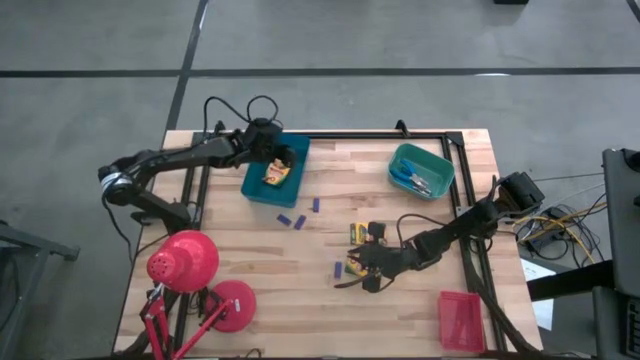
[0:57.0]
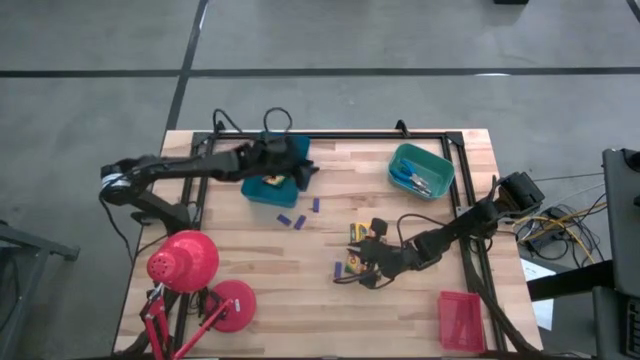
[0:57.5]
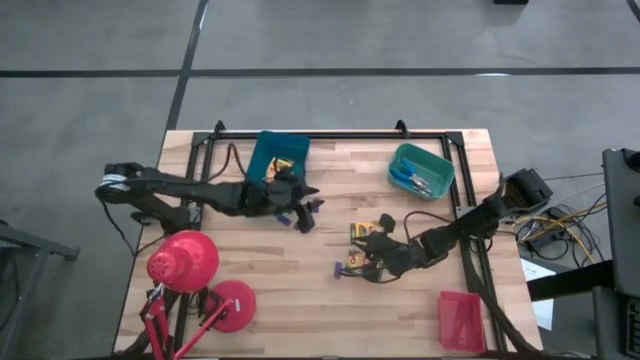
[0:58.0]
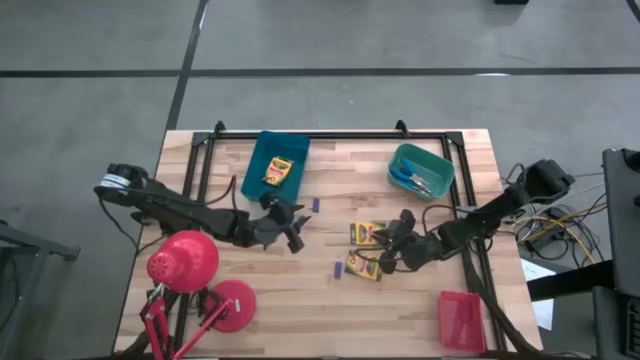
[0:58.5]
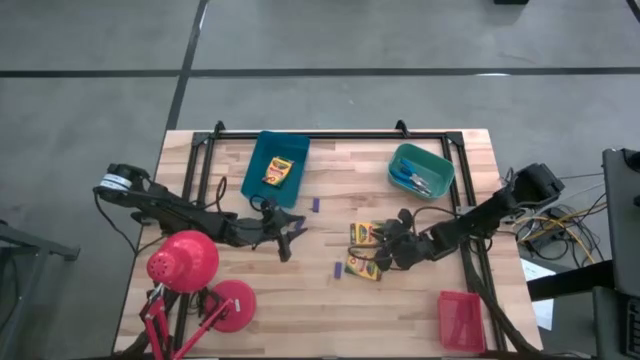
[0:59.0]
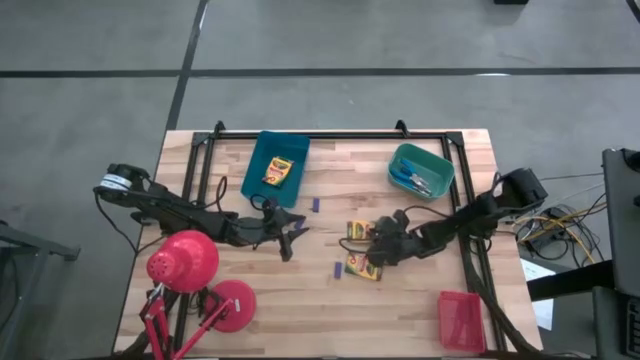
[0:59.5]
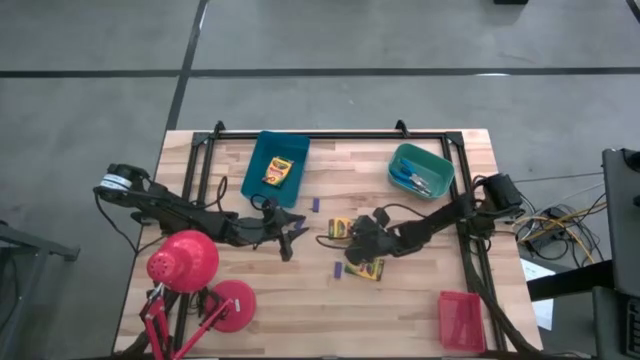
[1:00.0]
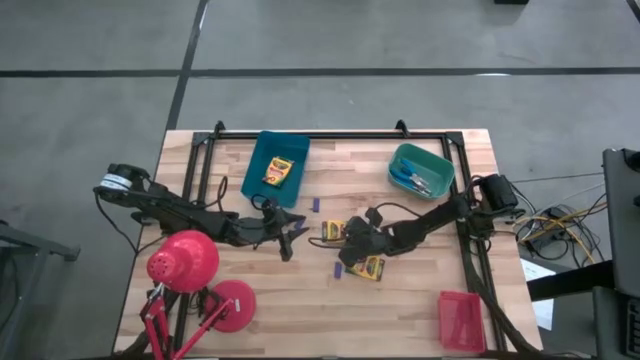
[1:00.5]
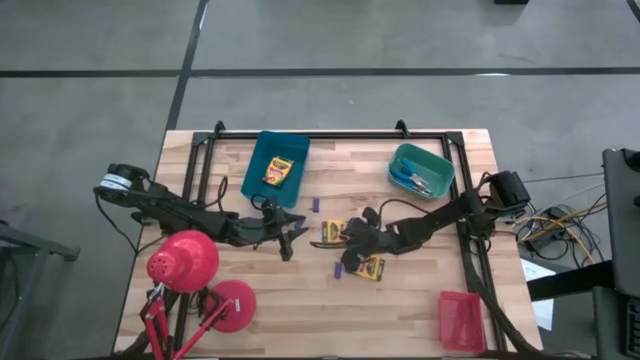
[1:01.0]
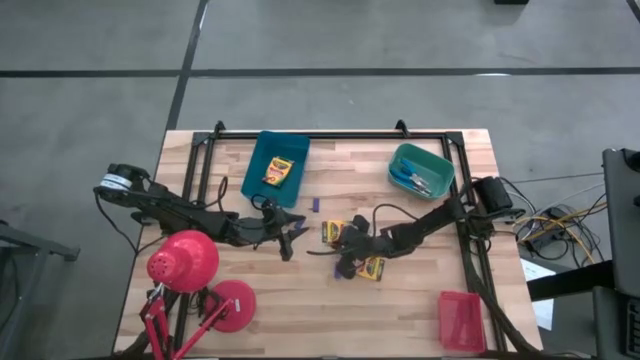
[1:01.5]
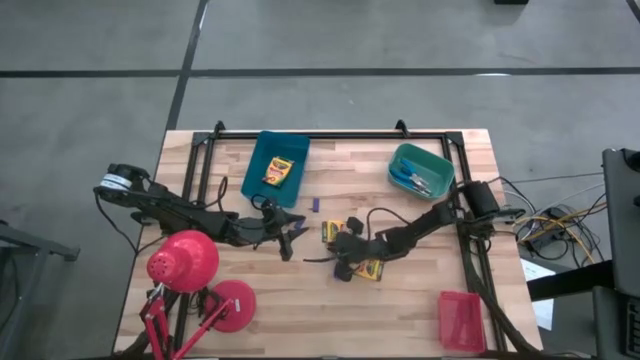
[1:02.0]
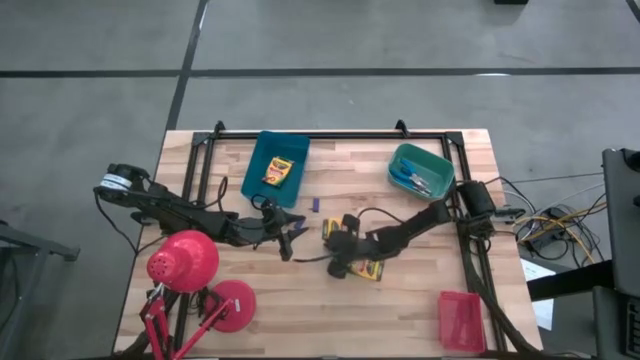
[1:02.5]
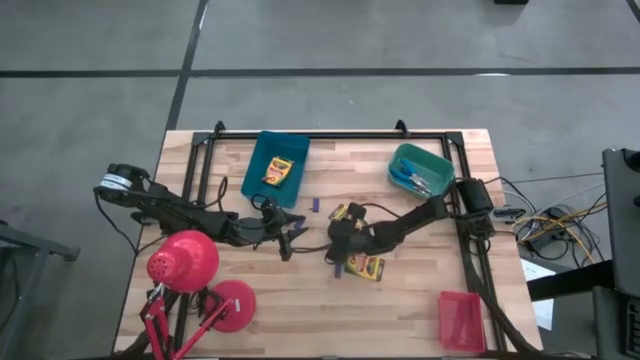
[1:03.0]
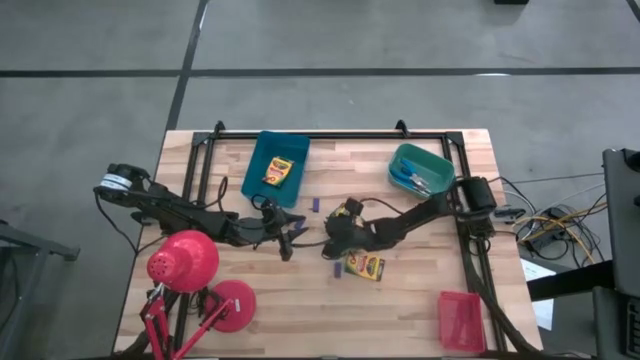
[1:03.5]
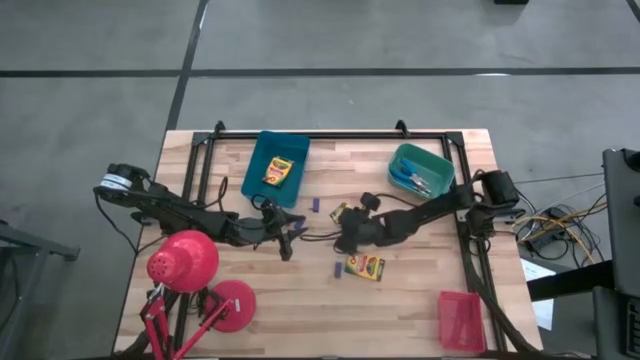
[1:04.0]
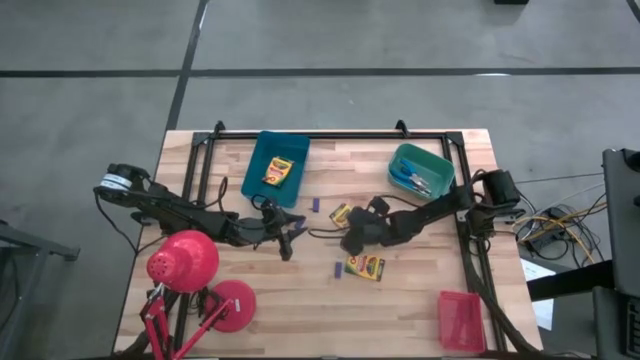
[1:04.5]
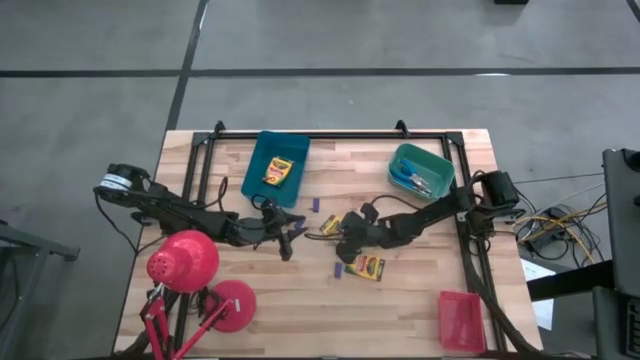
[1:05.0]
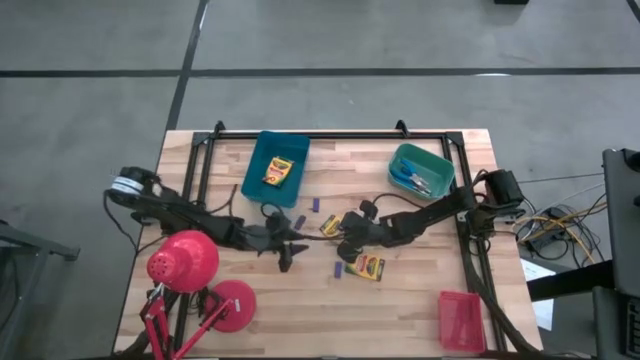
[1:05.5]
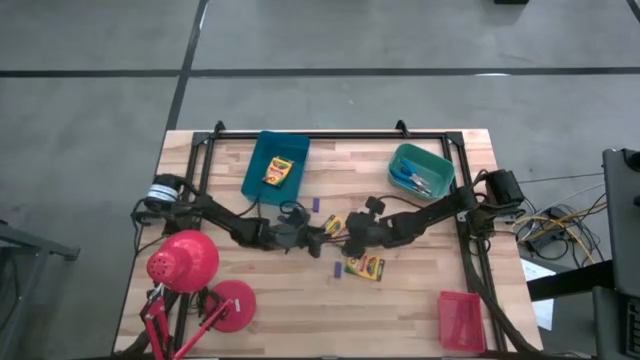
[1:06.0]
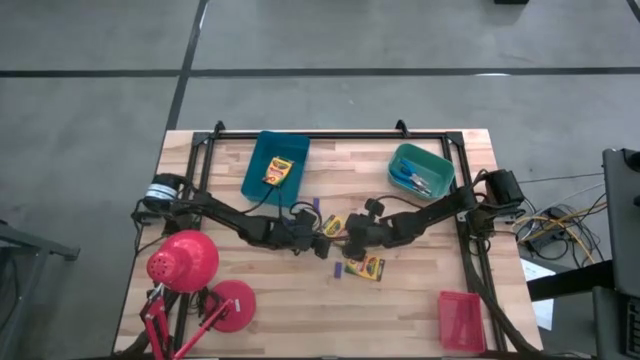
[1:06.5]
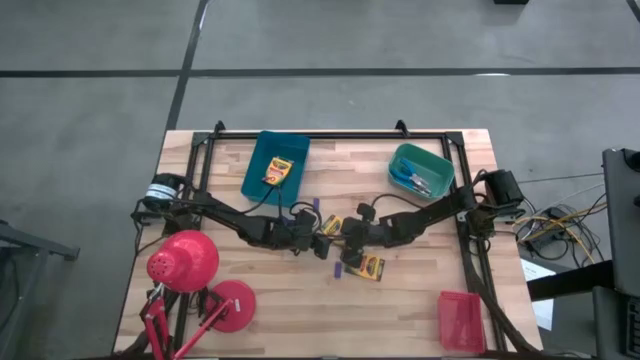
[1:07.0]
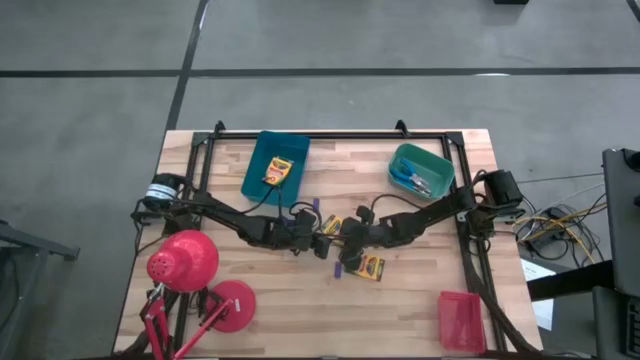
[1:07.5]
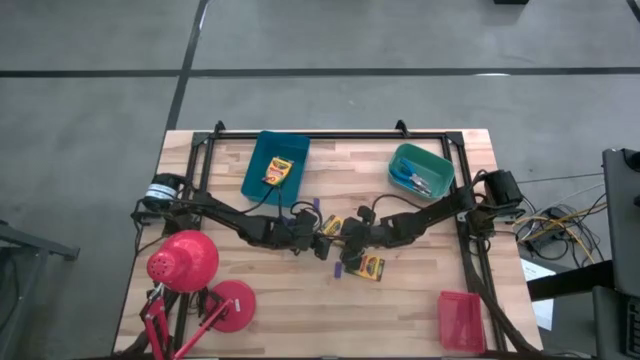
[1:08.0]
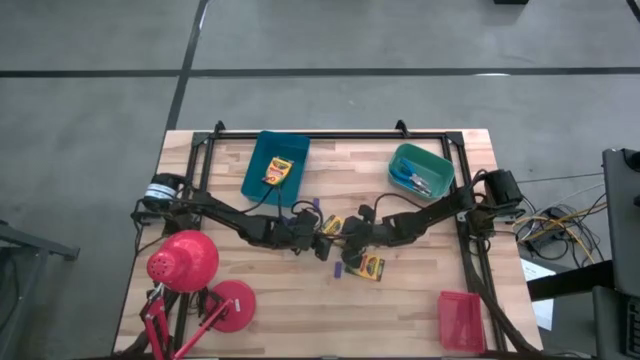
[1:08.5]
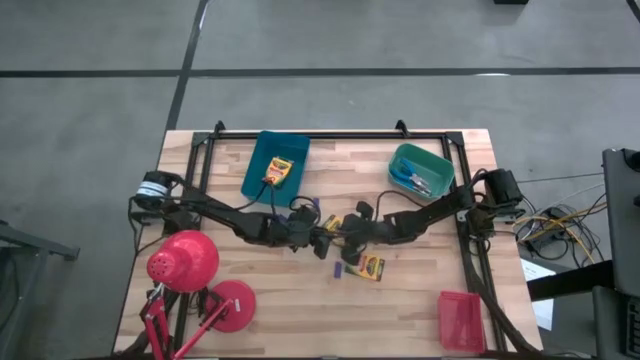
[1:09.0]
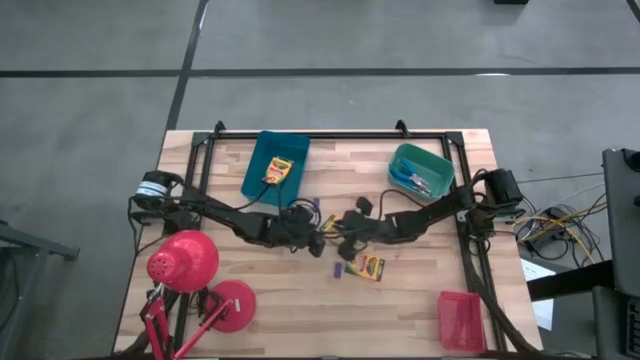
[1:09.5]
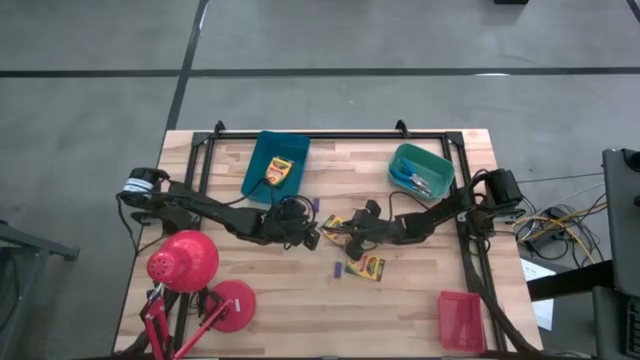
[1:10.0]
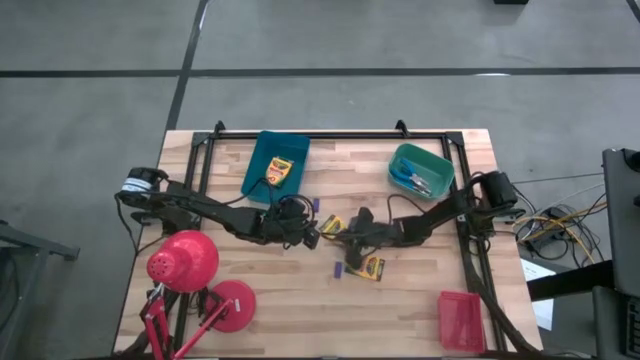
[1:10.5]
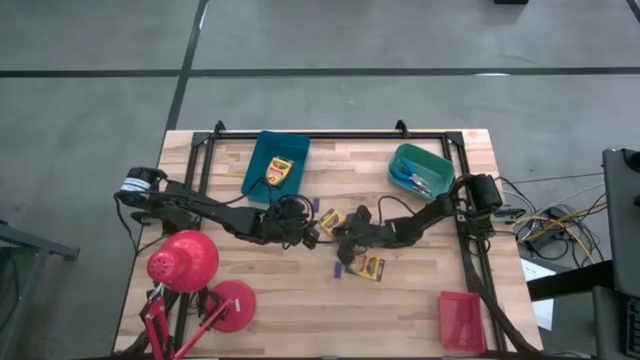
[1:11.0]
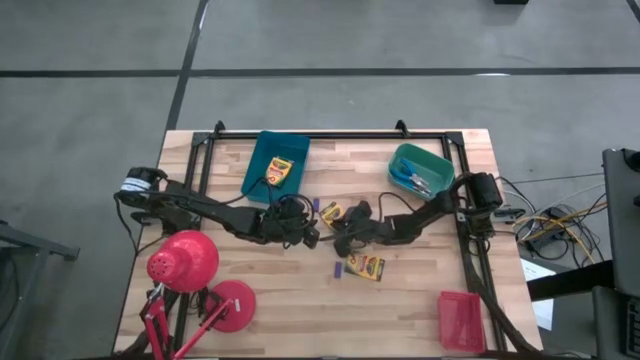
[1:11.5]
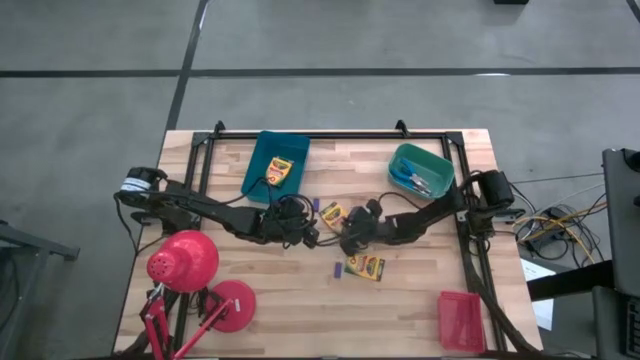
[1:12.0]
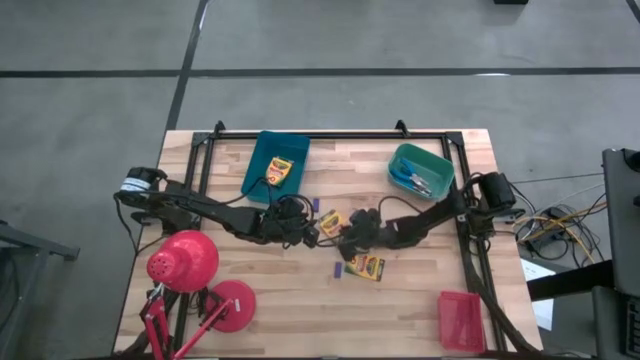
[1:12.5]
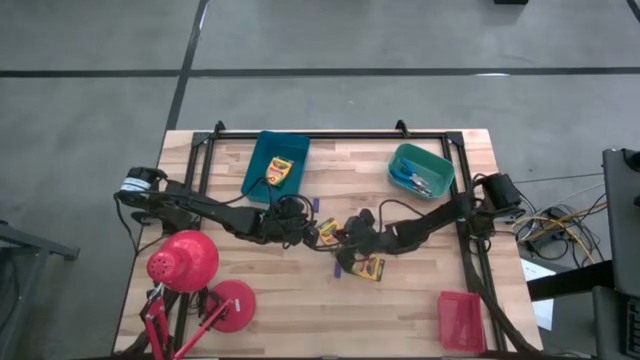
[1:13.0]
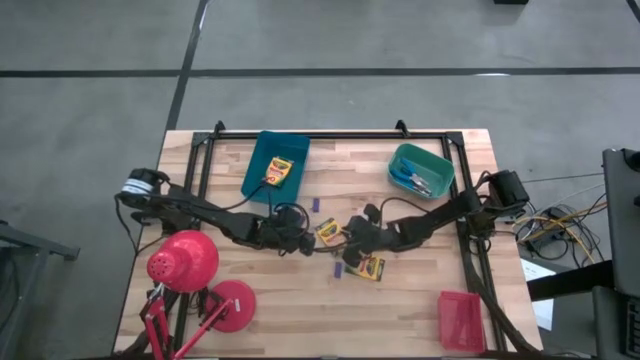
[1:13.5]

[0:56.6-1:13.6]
Task: Pick & Place School Supplies
Put the yellow crayon box into the blue bin

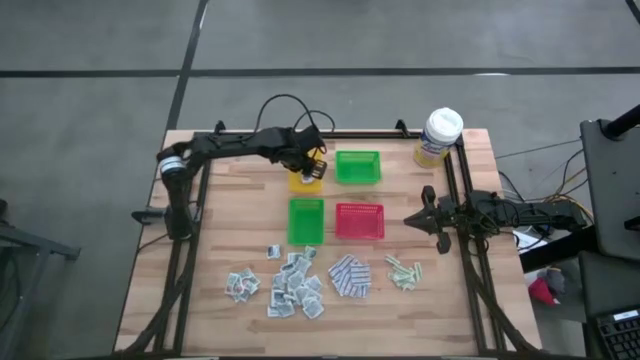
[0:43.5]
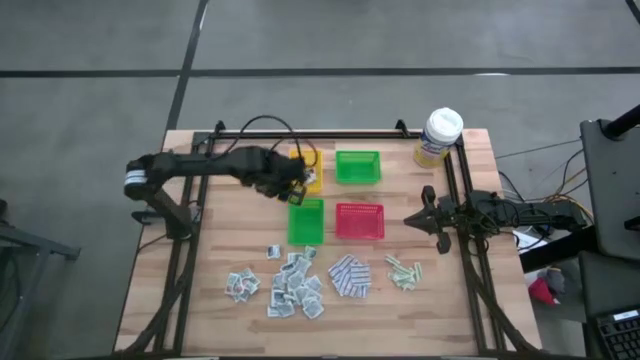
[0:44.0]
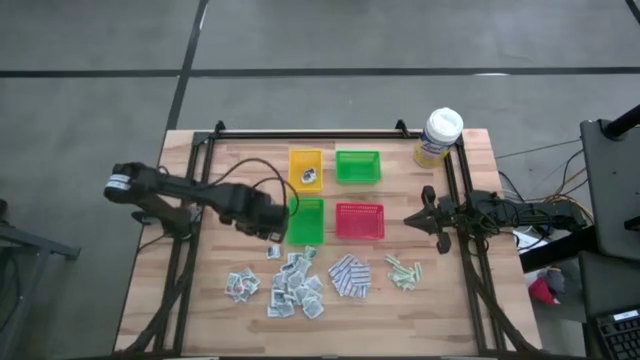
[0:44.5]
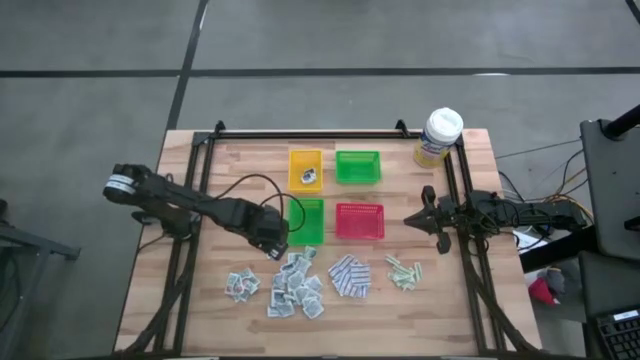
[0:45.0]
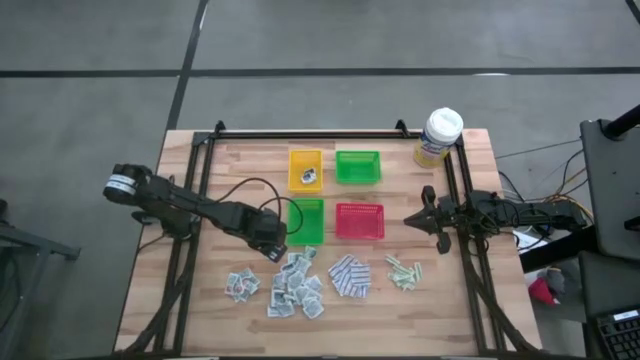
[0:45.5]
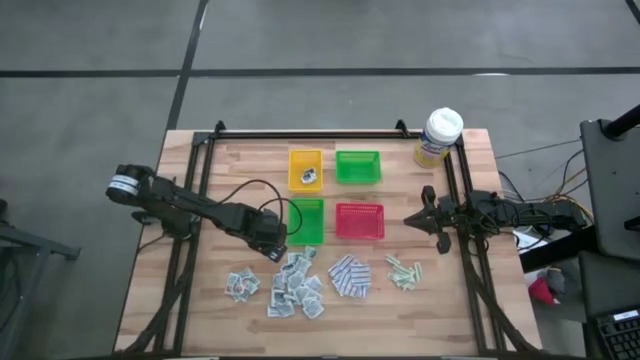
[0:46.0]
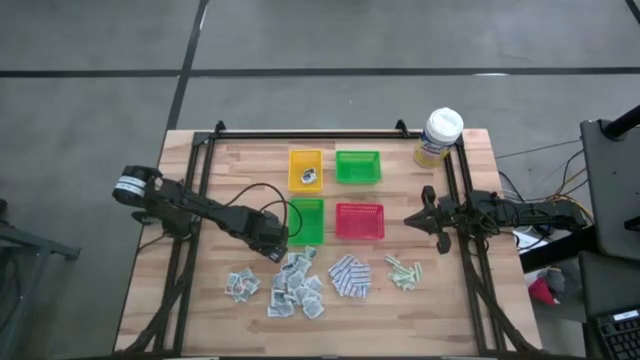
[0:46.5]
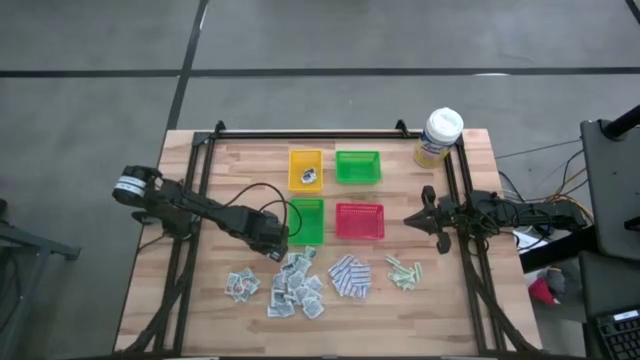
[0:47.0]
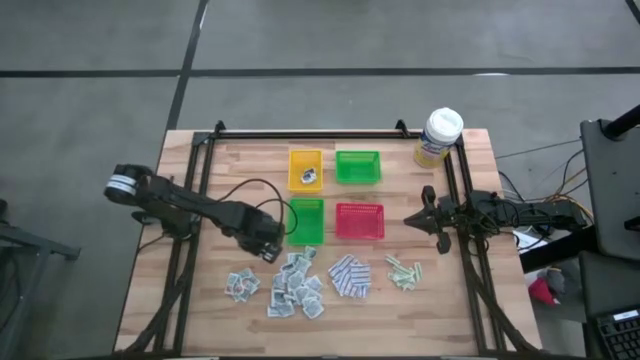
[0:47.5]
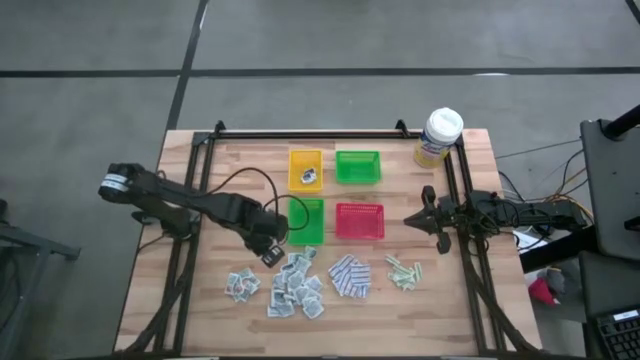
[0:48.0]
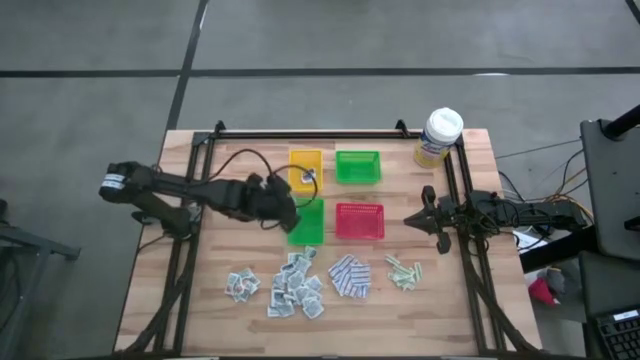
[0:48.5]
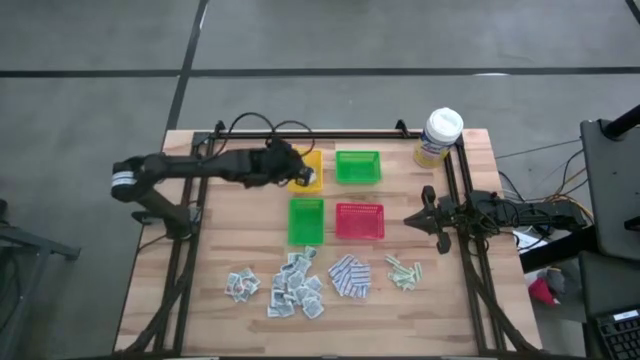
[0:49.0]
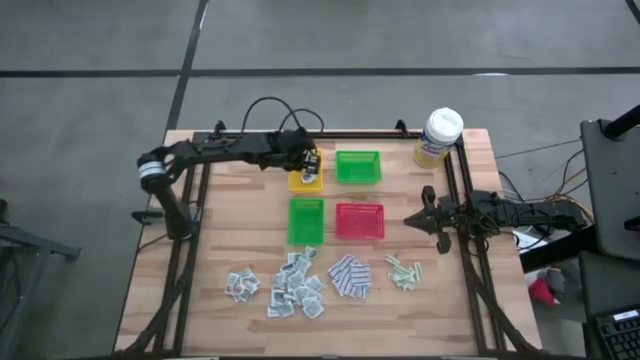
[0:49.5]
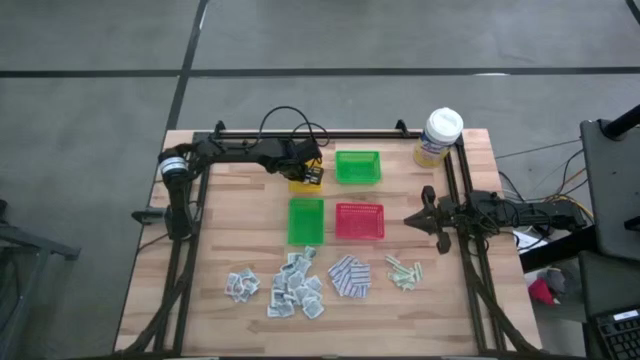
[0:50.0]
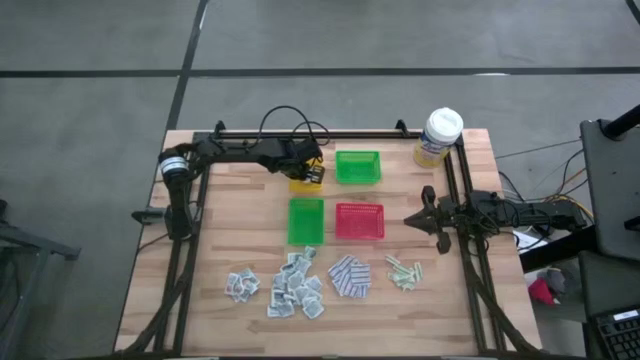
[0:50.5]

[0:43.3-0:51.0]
Task: Pick & Place First Aid Supplies
Put the blue alcohol pad into the yellow bin
